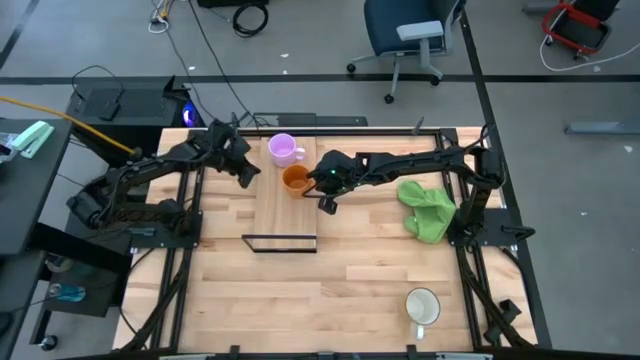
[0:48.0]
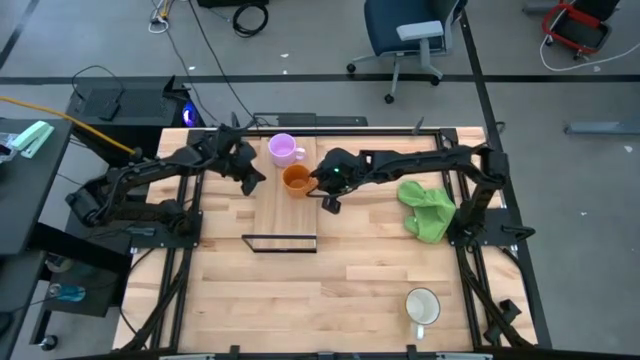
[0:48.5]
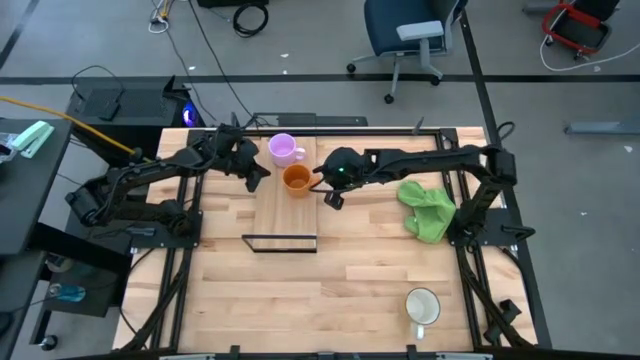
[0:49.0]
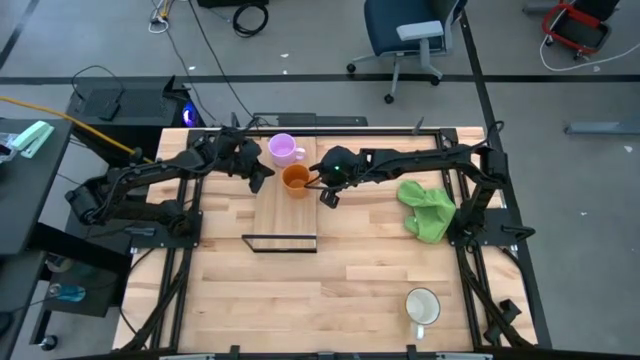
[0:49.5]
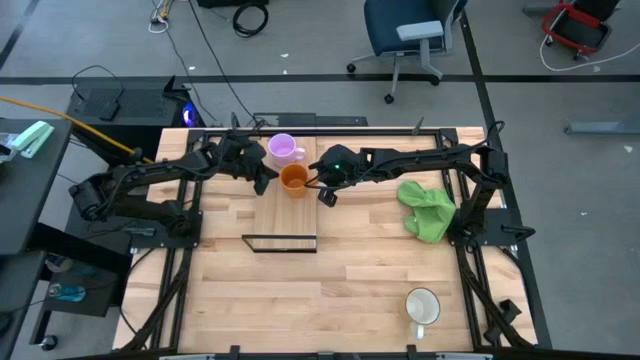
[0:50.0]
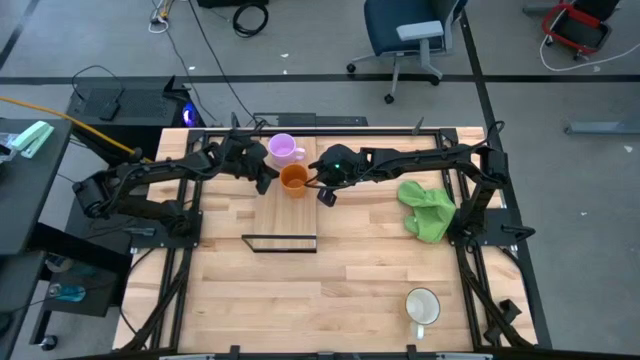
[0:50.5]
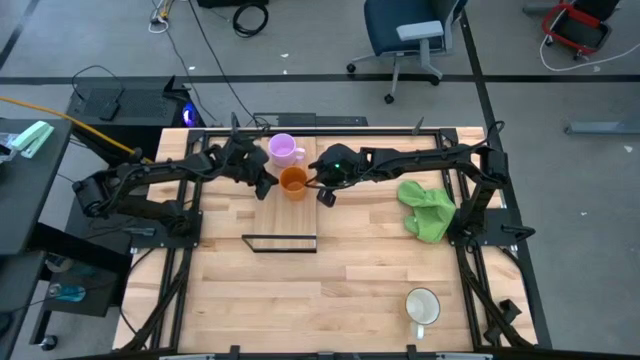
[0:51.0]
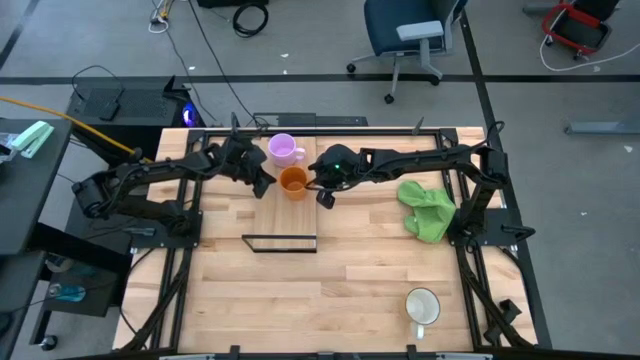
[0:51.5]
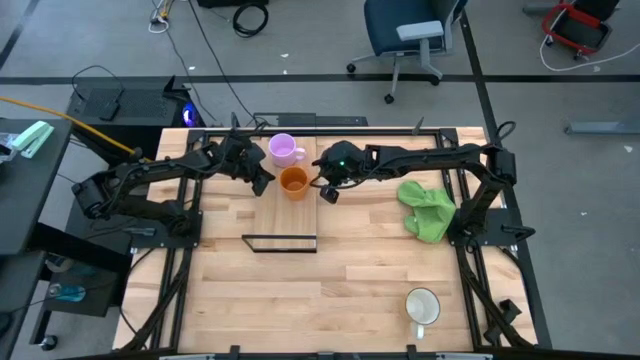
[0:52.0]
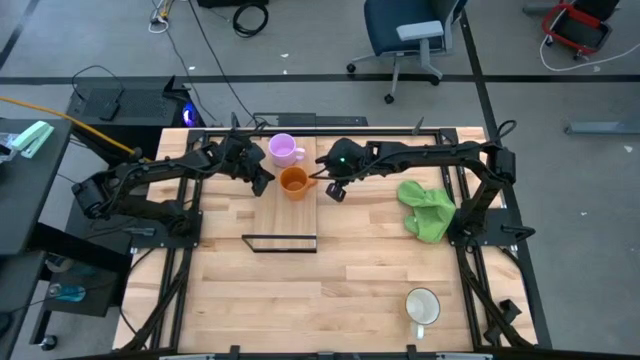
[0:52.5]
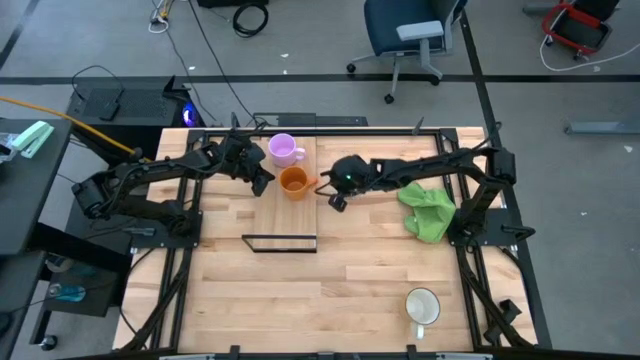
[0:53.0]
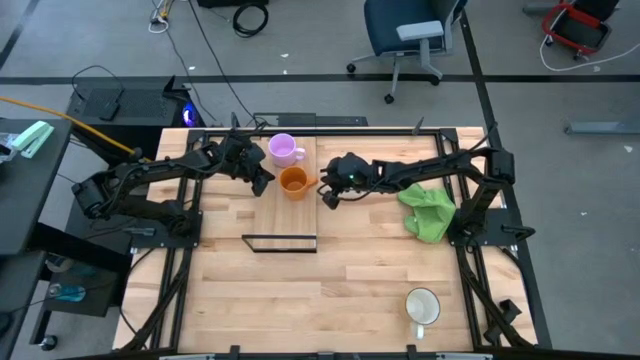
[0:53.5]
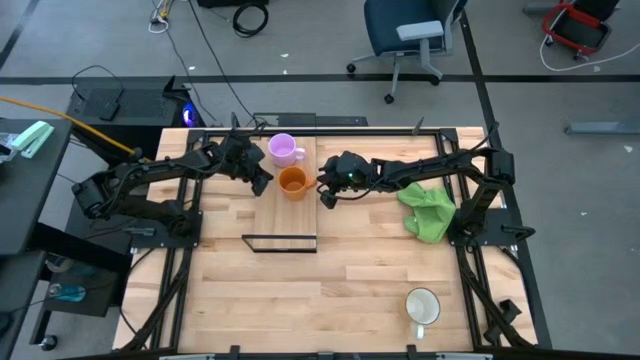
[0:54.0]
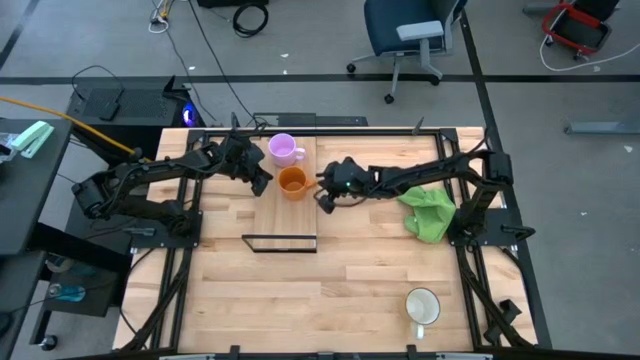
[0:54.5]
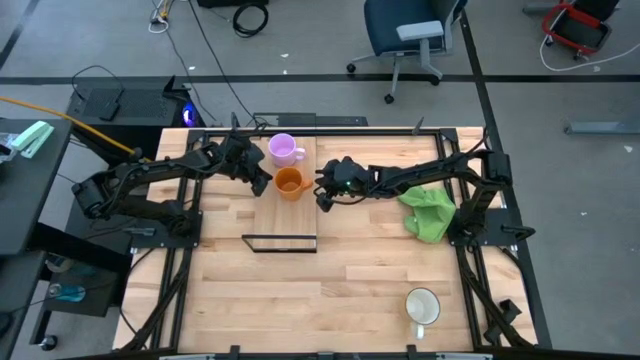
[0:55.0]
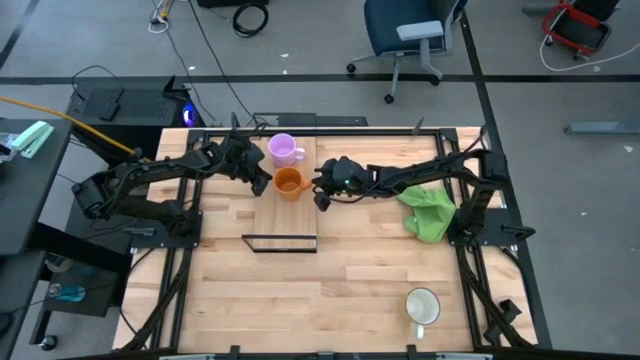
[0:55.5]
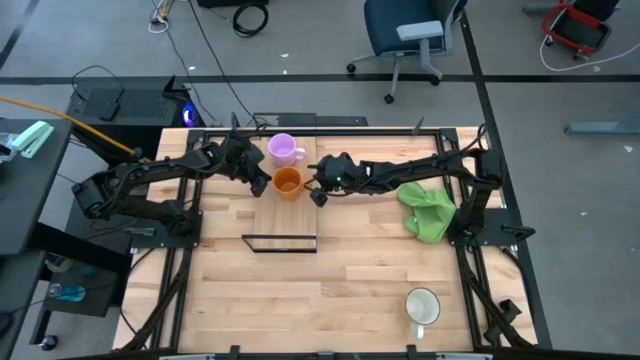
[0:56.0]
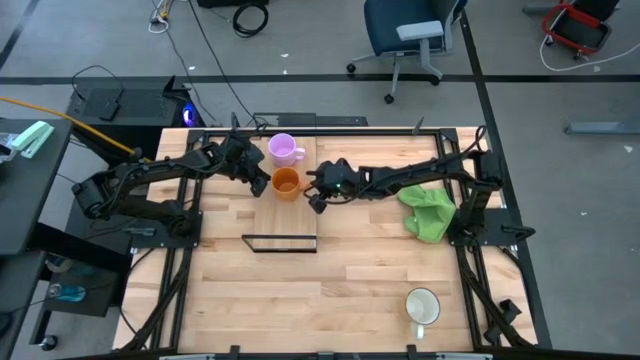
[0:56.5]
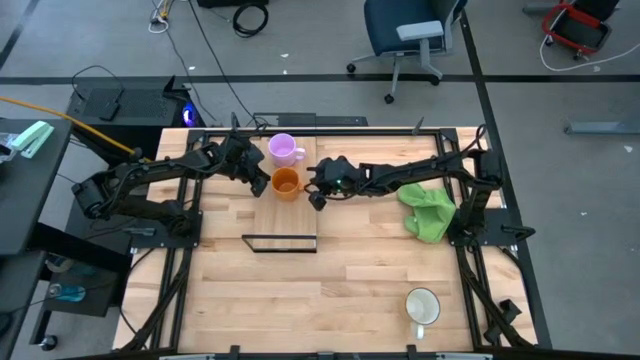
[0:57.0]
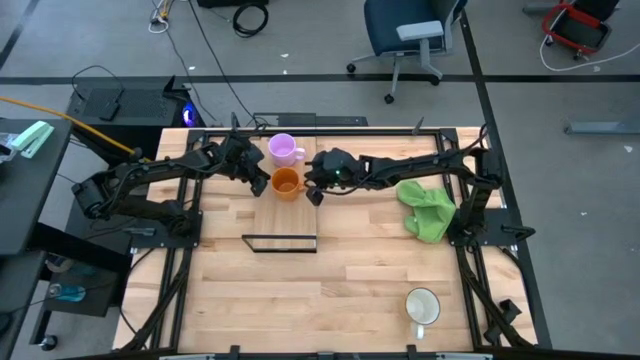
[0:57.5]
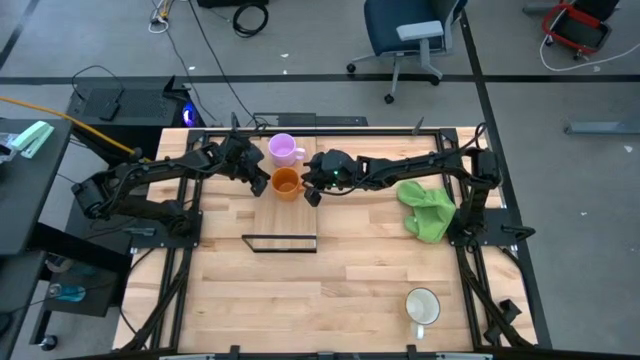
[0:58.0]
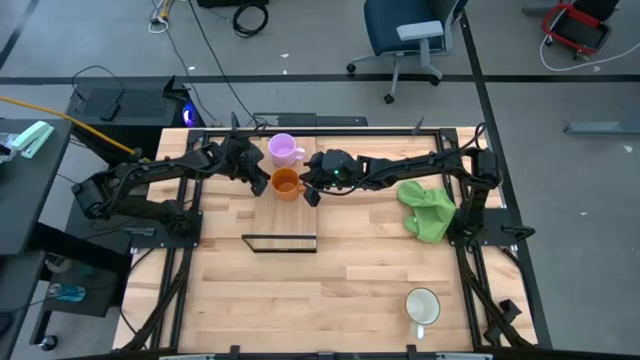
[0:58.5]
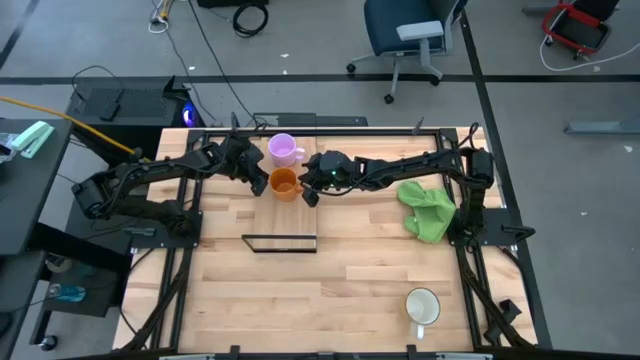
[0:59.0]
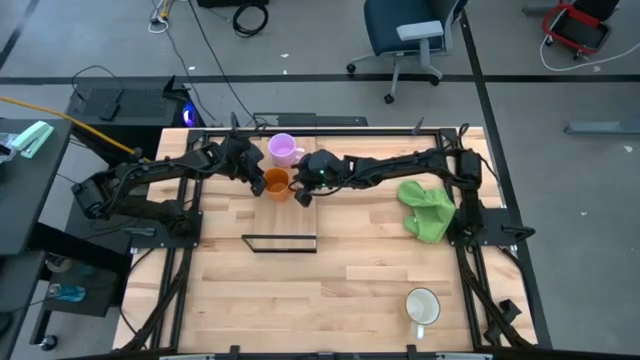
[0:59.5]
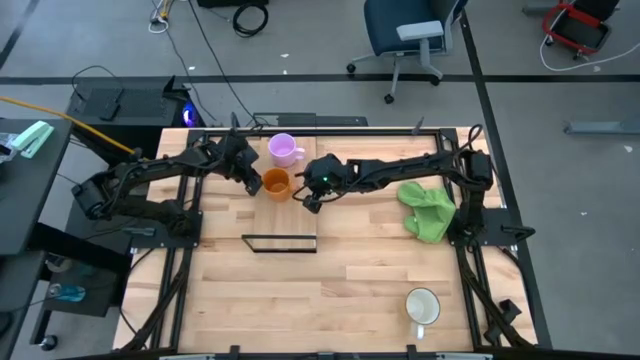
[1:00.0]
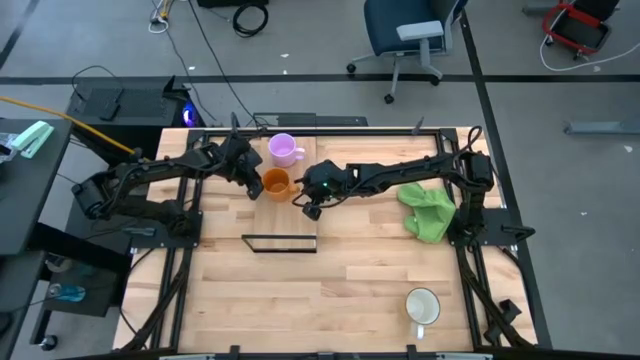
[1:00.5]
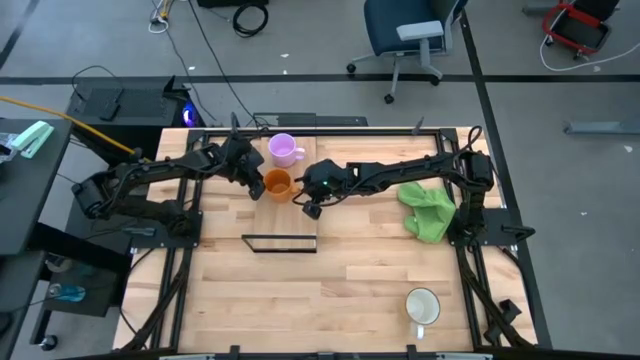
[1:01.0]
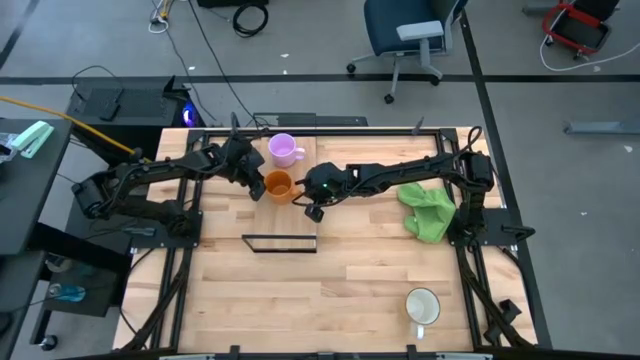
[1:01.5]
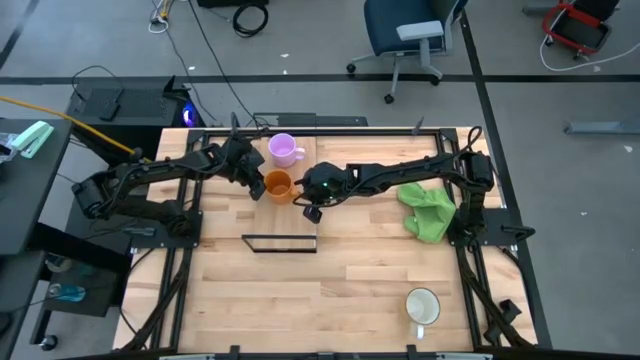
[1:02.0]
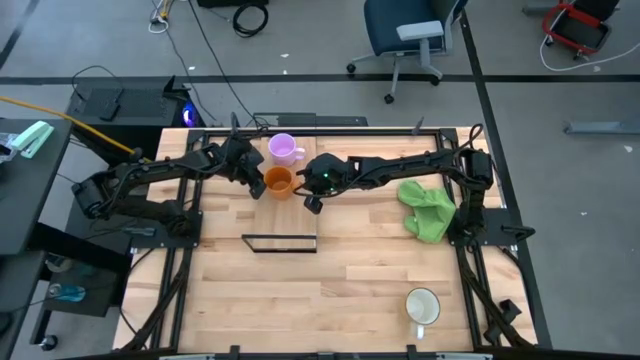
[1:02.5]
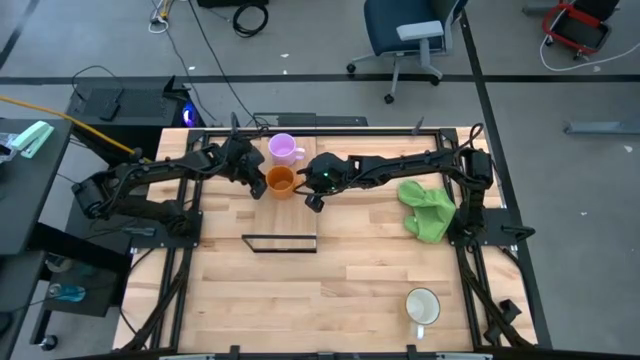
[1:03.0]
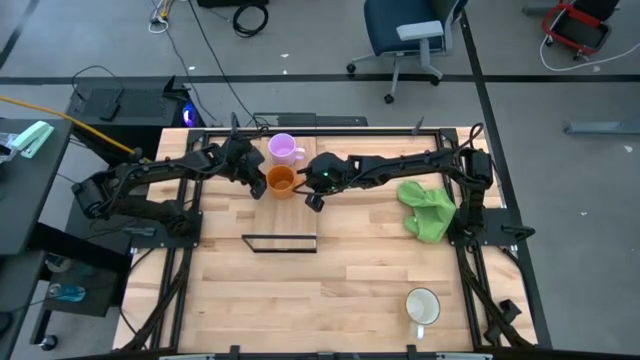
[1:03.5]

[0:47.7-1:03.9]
Task: Stack small to large cups/mugs on shelf
Put the orange mug on the shelf

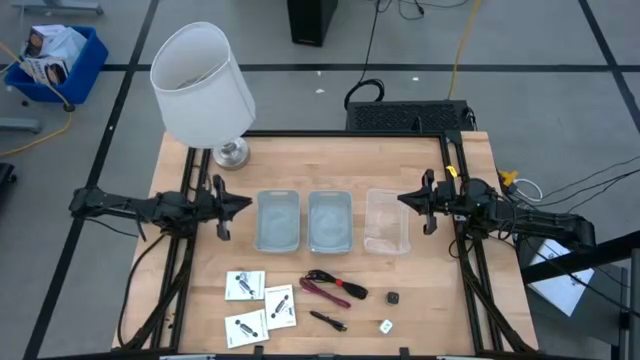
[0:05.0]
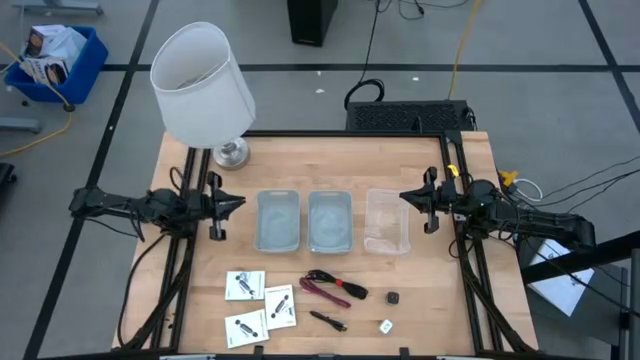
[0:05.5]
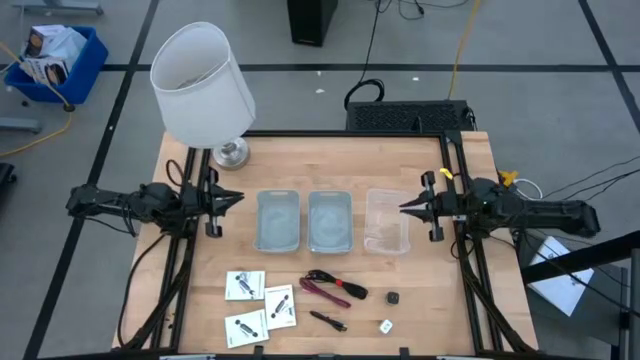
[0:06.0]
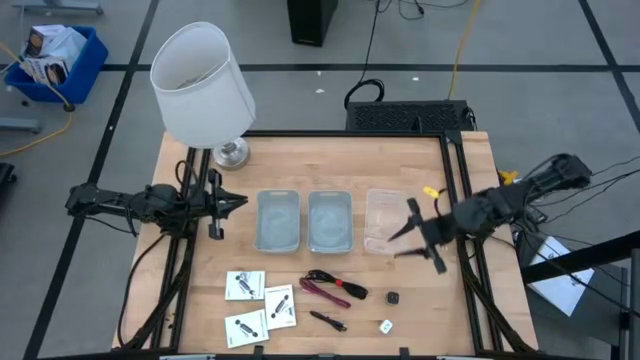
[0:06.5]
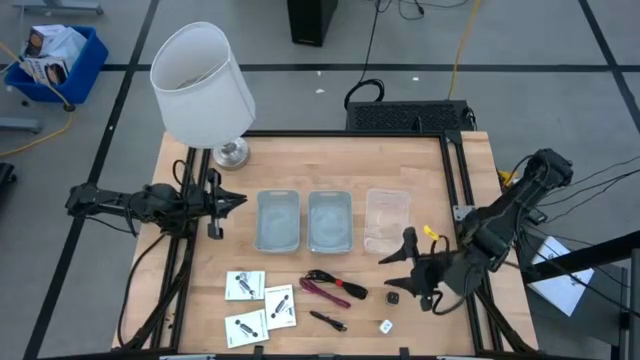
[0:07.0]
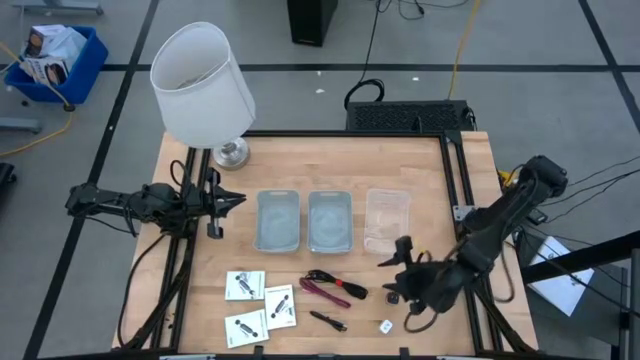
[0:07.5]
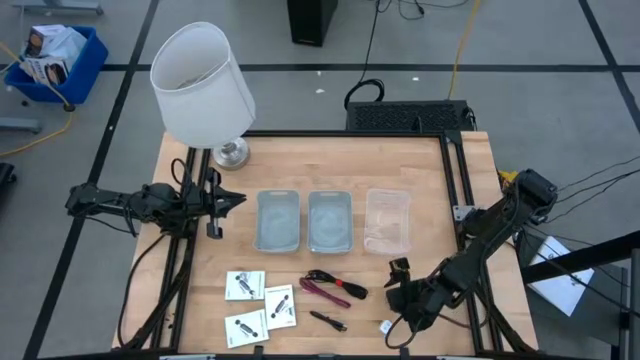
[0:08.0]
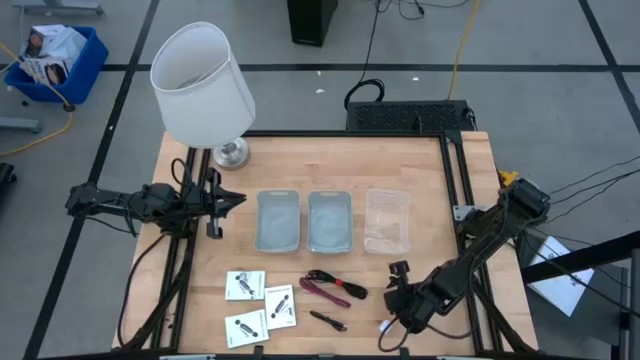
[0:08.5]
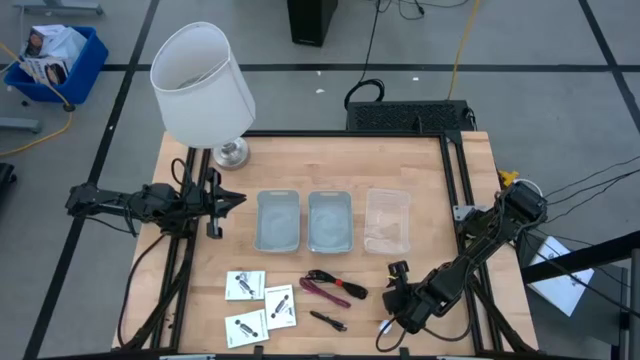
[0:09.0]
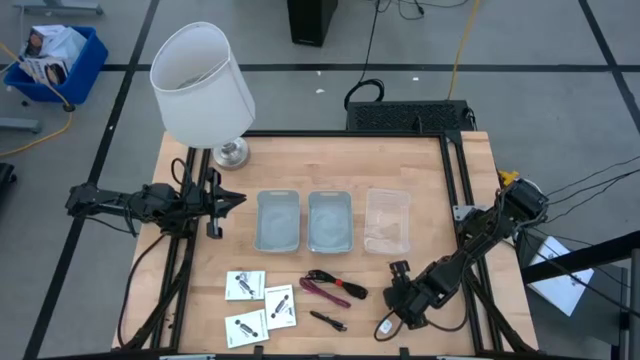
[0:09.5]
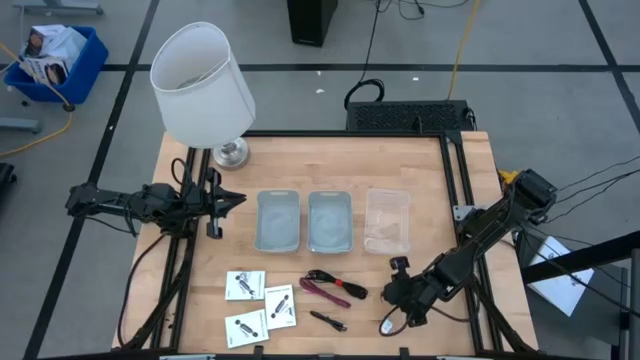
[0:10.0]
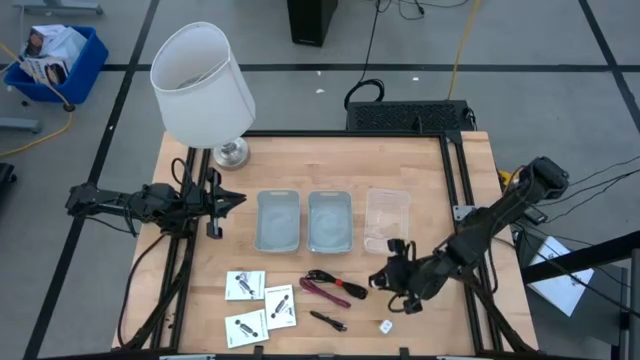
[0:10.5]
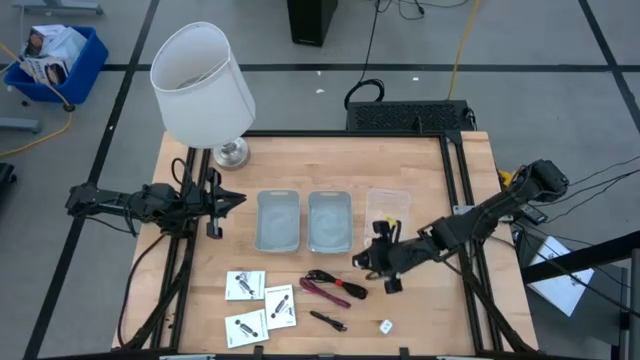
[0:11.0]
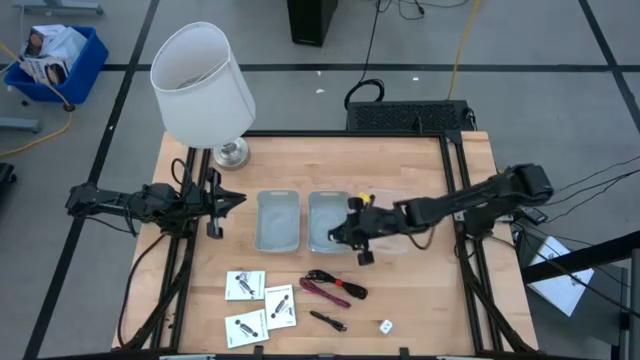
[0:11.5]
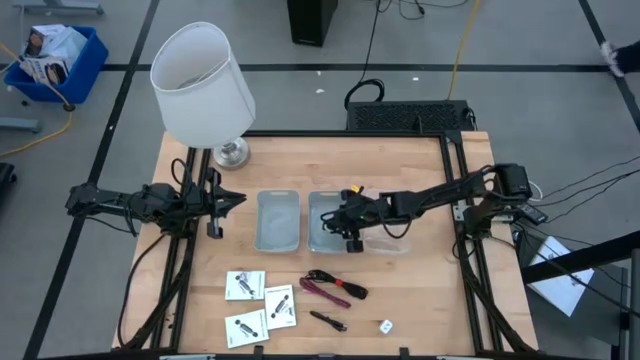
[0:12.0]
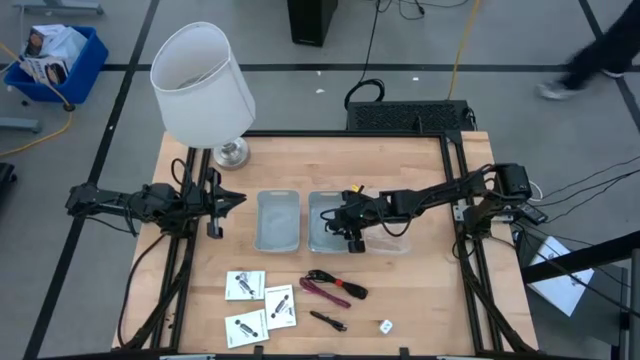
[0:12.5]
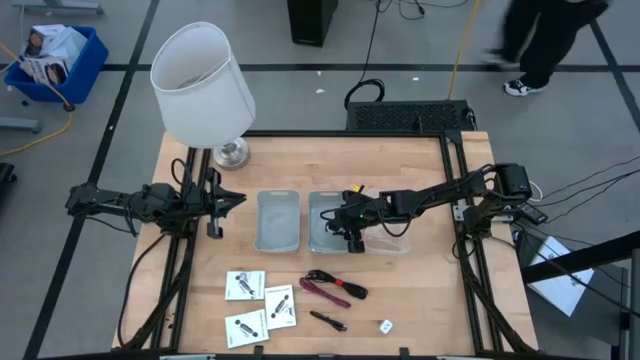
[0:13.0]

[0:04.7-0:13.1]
Task: Pick and place items into bin
Put the black charger adapter into the right gray bin
